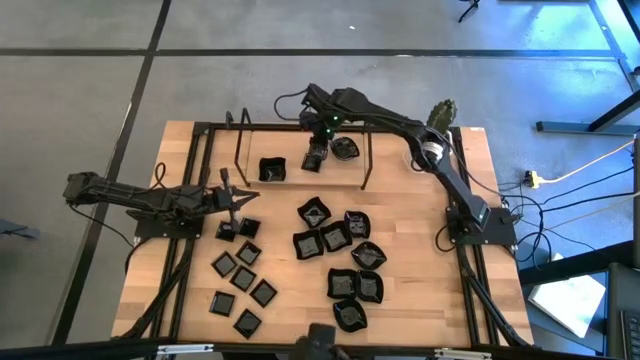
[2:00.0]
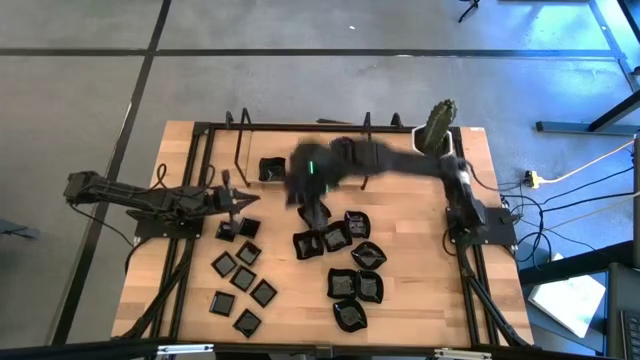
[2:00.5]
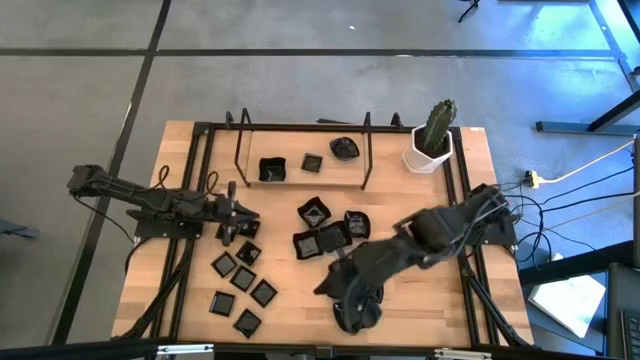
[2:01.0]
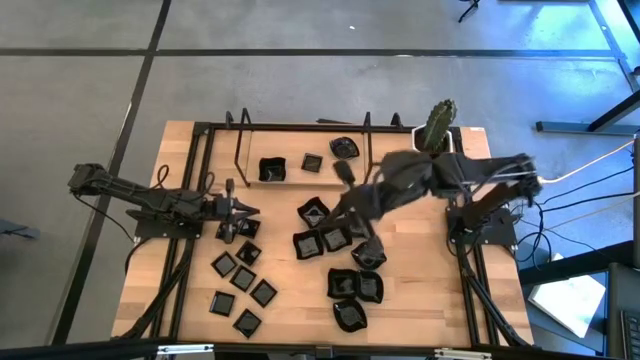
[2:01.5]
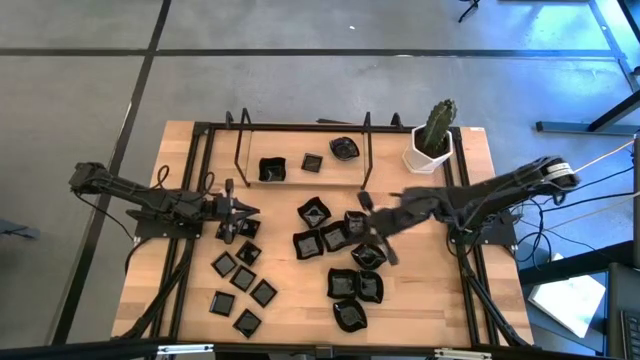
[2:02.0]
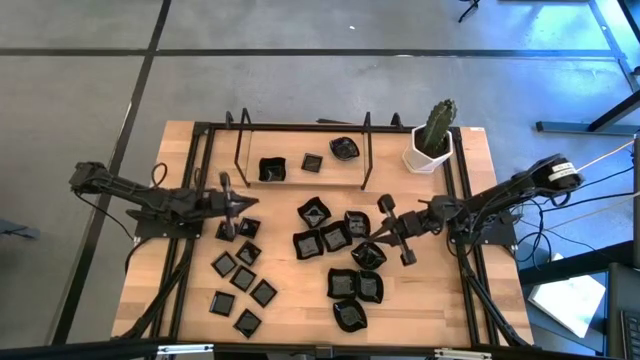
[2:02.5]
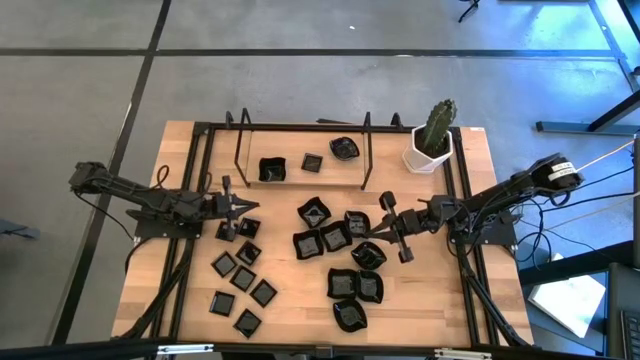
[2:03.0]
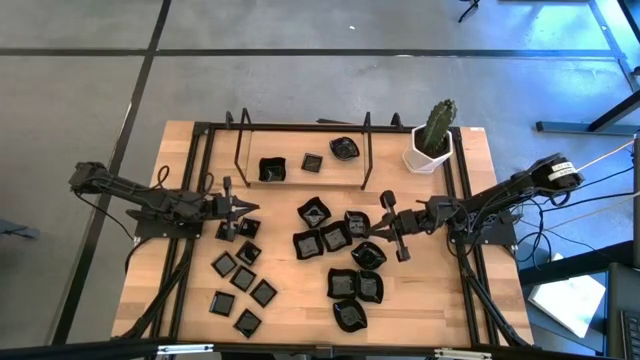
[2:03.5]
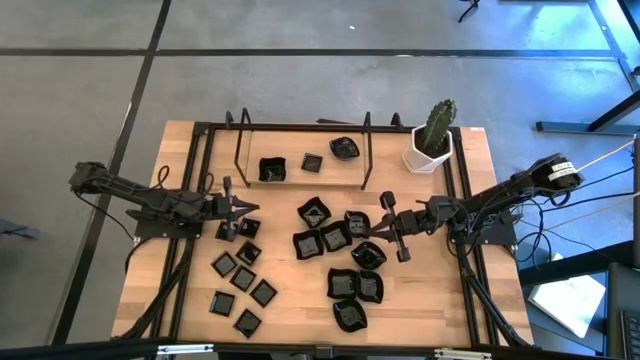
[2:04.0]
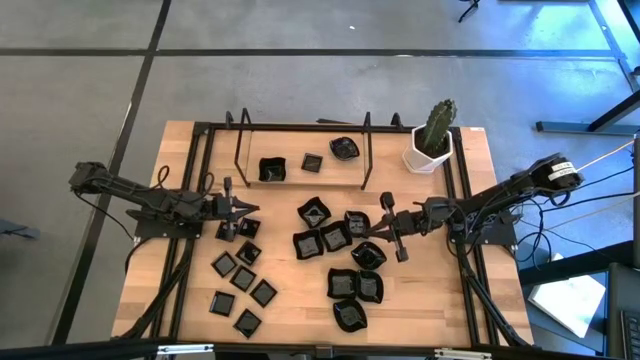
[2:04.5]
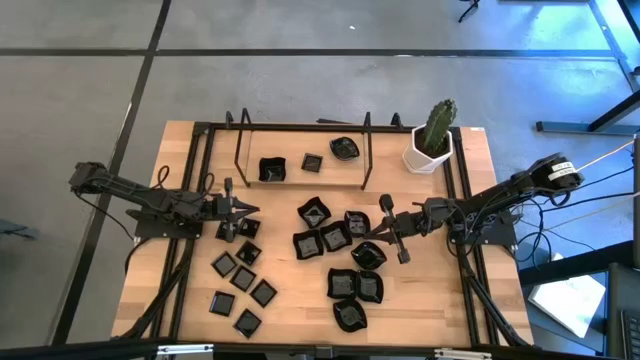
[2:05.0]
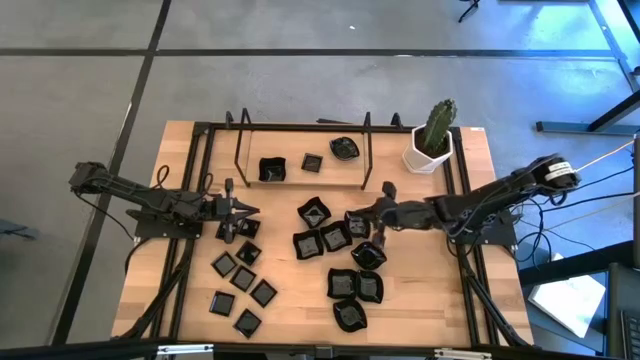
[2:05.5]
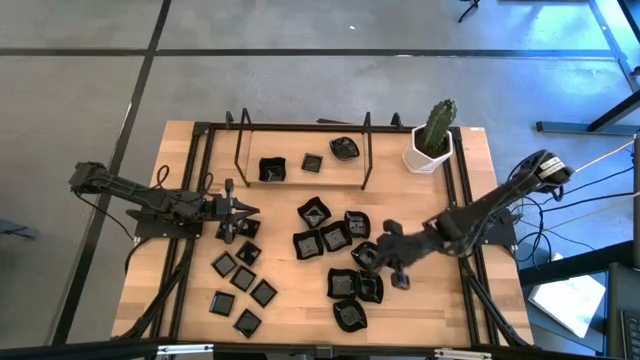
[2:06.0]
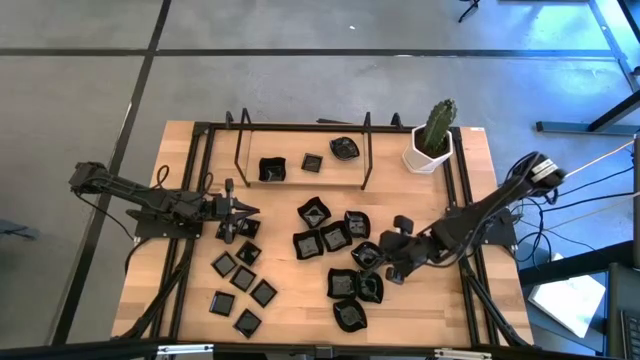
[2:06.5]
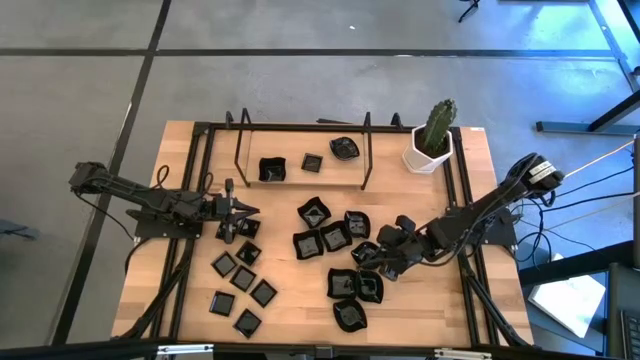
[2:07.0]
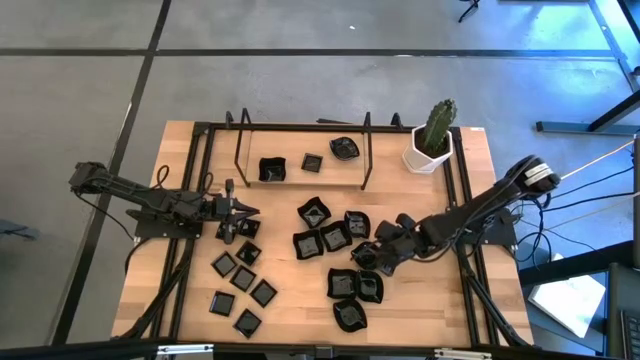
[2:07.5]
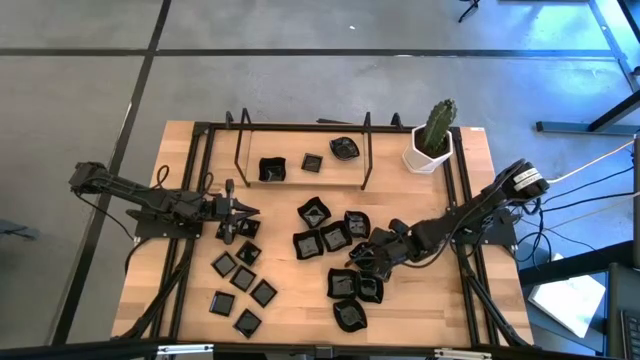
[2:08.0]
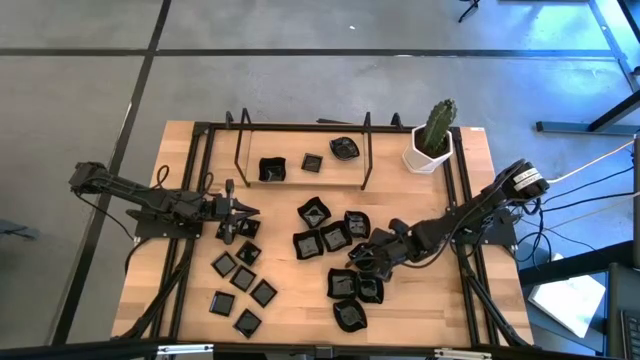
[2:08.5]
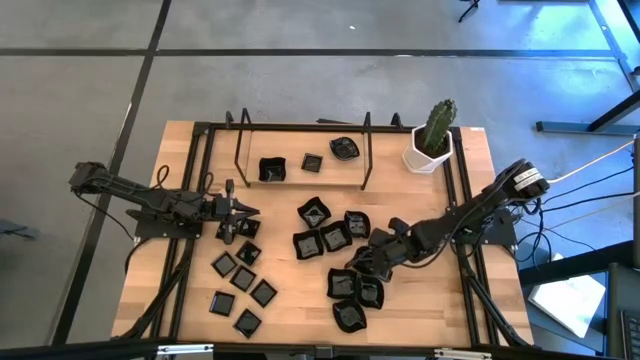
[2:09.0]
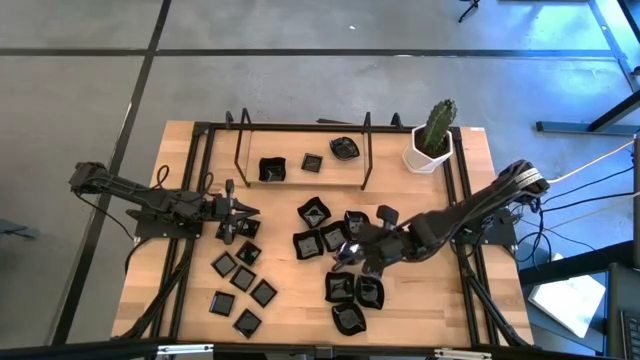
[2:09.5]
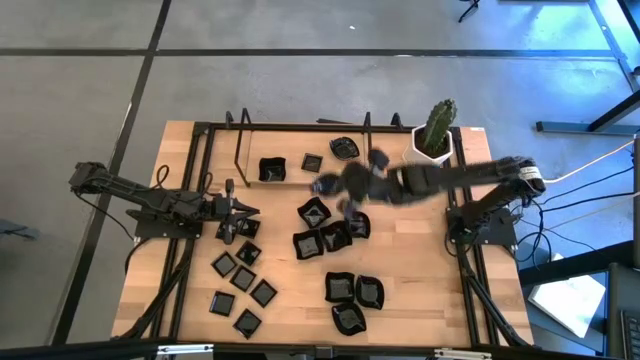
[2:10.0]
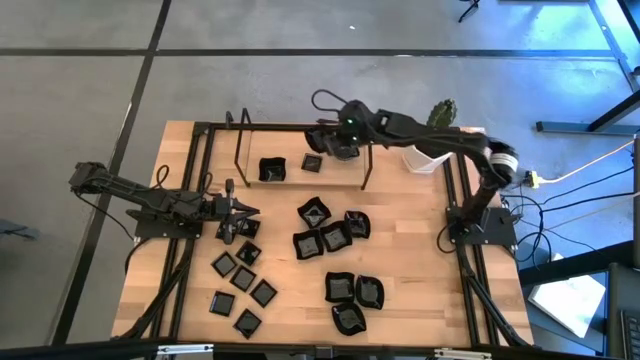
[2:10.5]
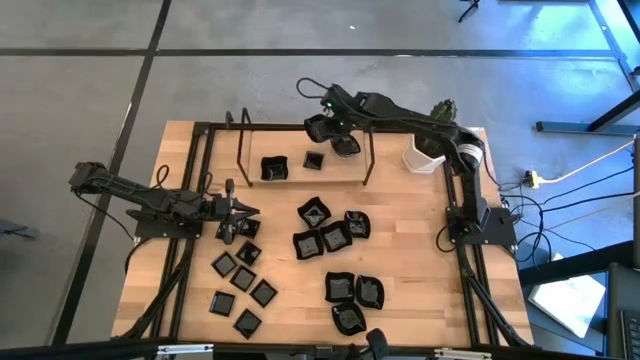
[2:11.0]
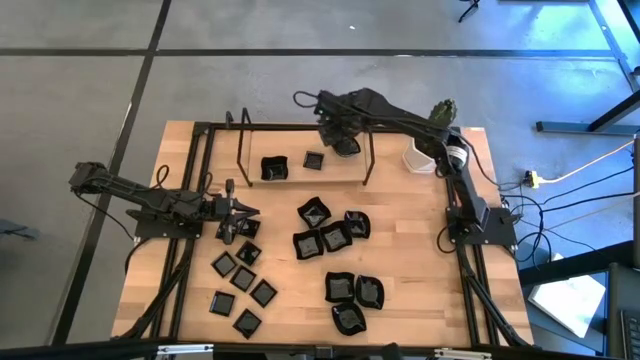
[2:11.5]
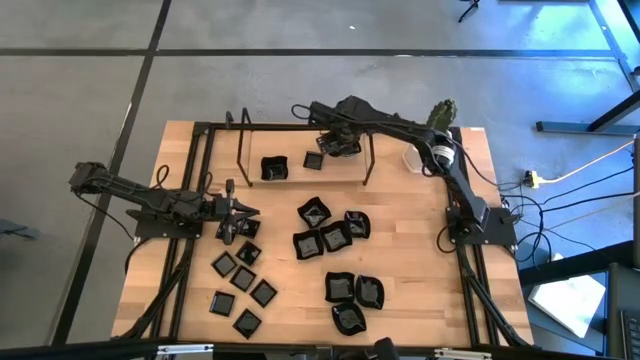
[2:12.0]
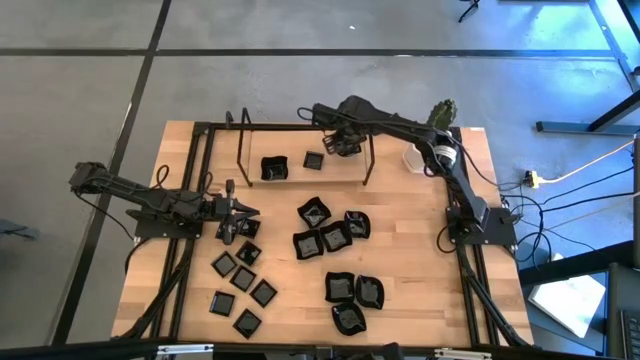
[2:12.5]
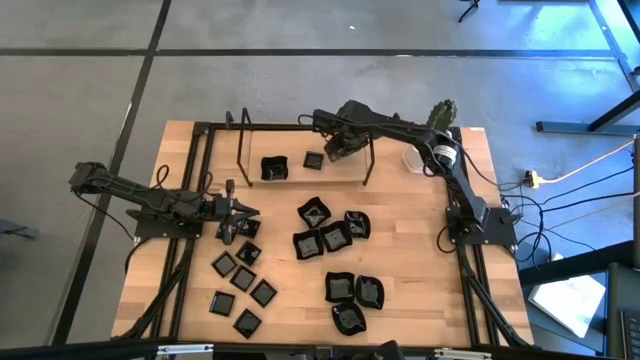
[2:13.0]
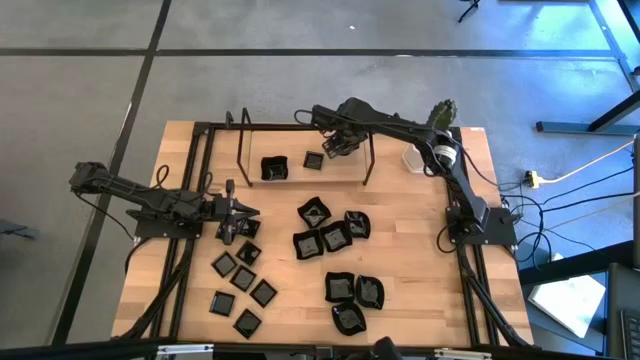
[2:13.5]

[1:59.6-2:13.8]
Task: Pick & Place Mini shaped plates
Stack the leaf-shaped plate on top of the leaf-shaped plate on the shelf

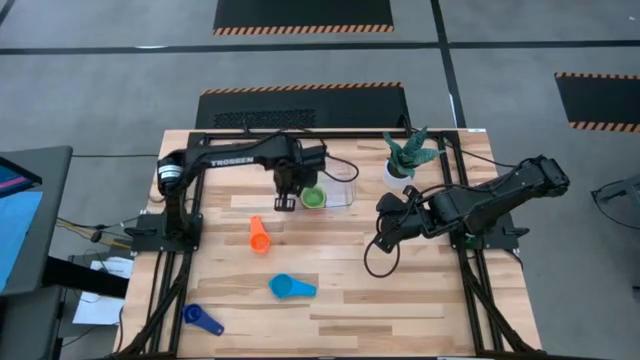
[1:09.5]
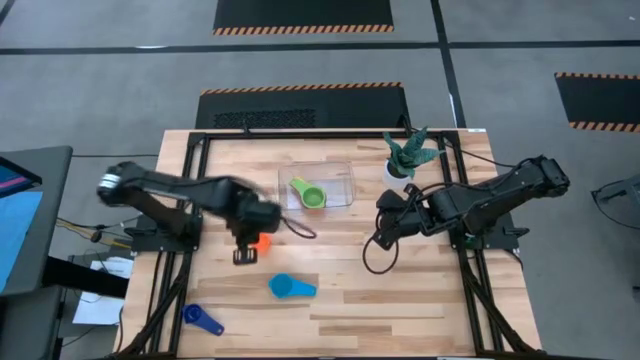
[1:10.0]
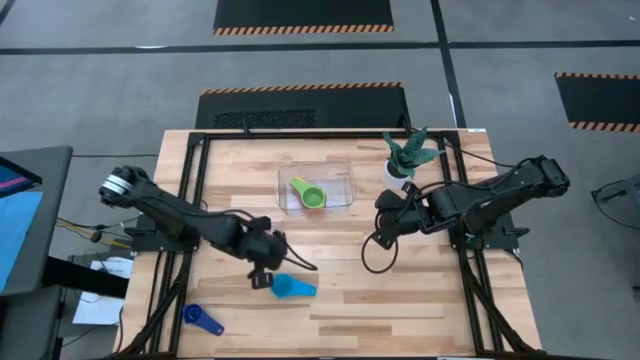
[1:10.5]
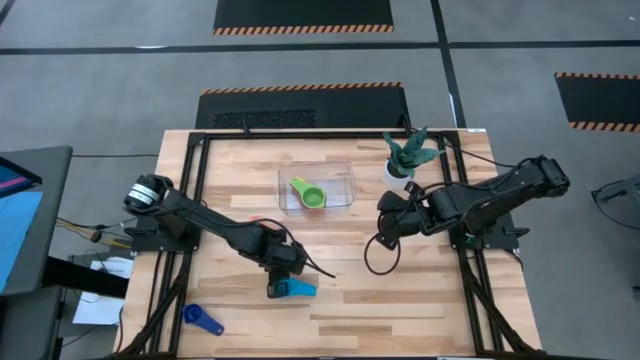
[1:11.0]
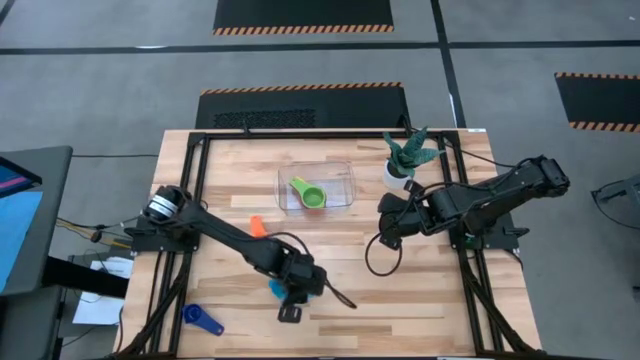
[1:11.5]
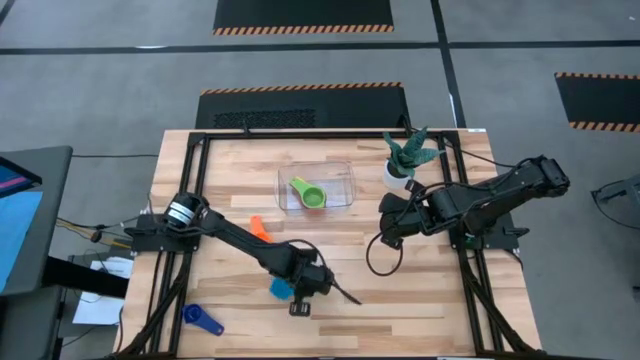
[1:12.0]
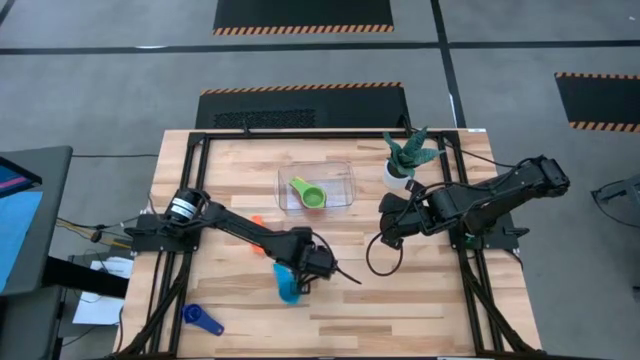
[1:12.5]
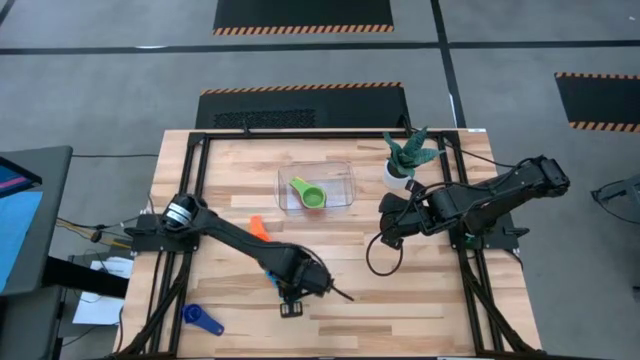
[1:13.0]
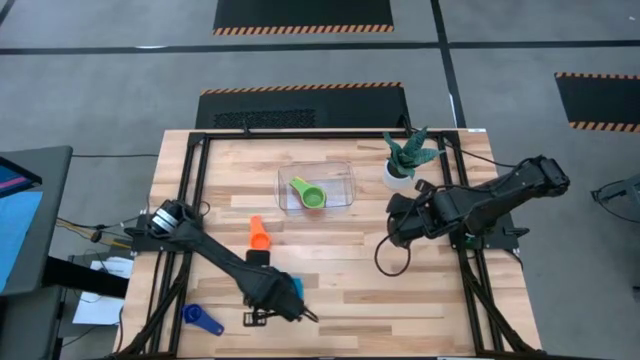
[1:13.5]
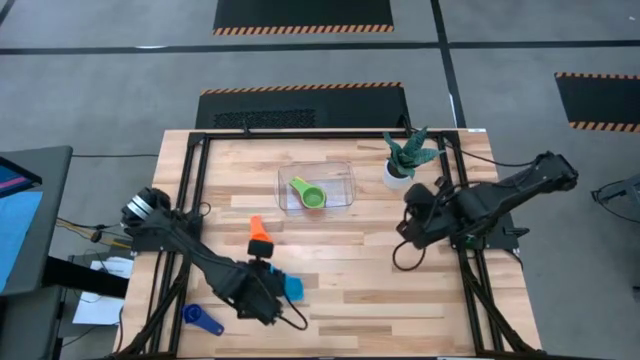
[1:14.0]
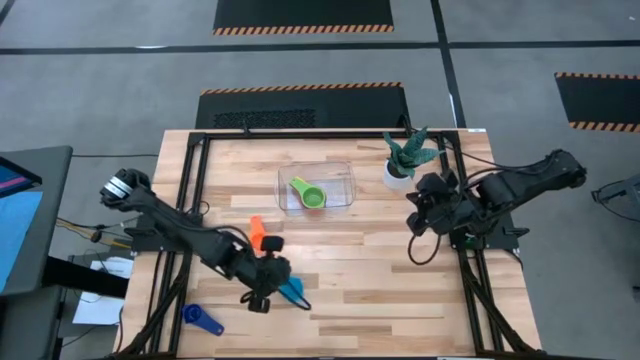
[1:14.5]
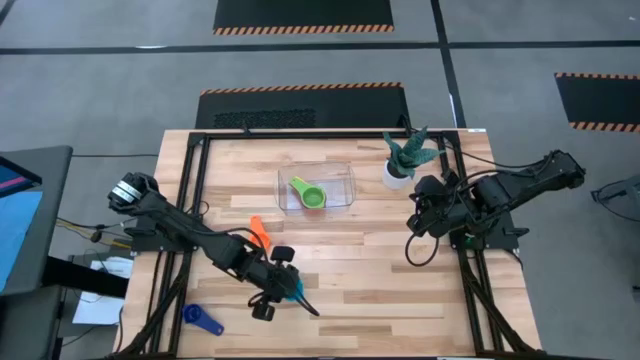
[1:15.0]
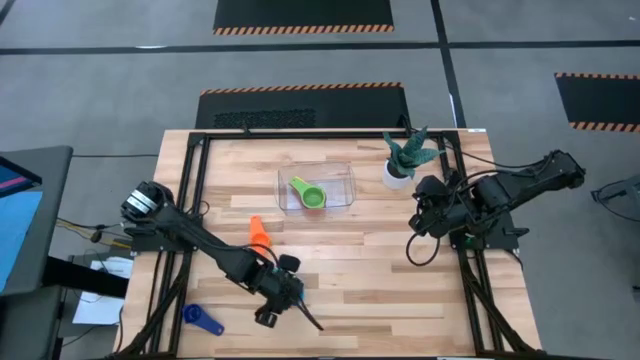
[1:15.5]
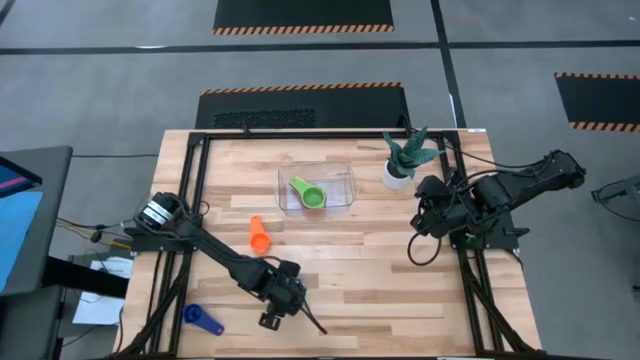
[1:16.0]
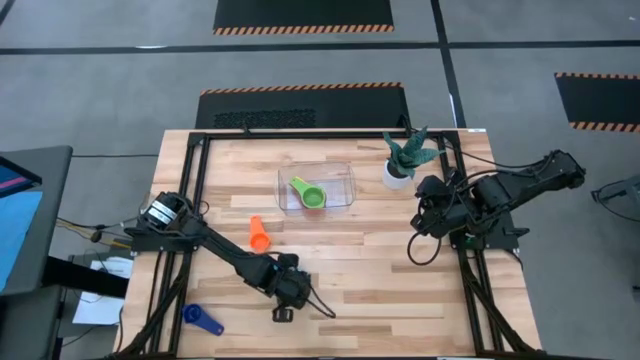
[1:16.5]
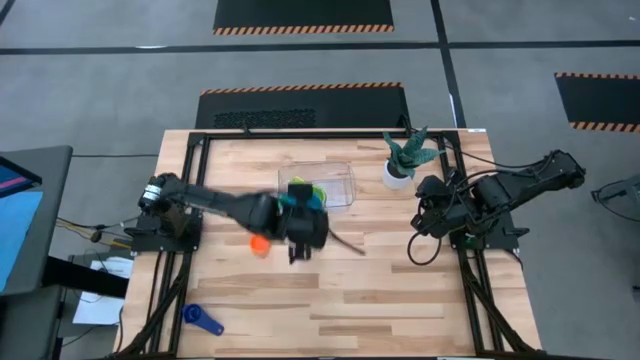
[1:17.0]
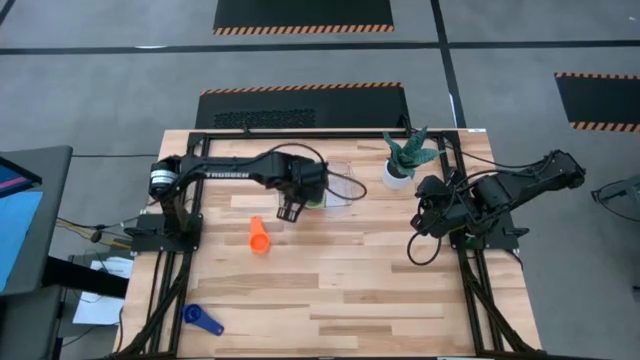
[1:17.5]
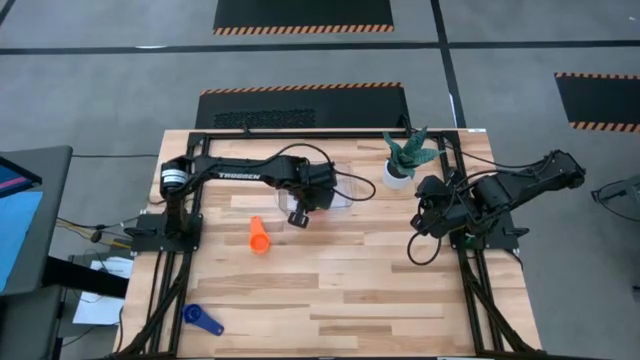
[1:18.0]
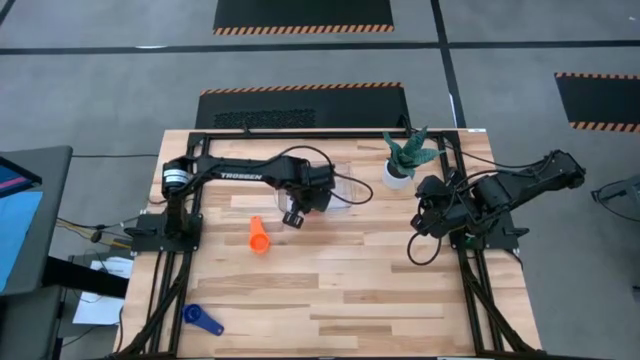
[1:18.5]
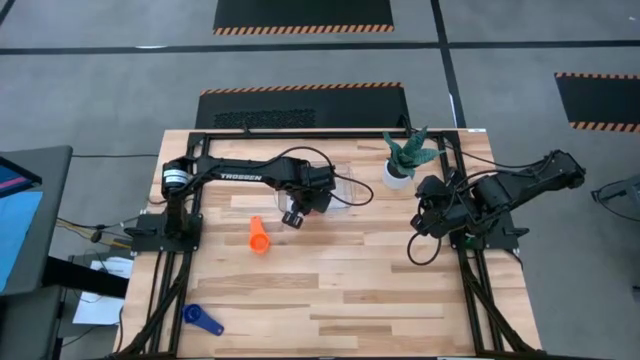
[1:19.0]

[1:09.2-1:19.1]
Task: Nest measuring cups in basket
Stack the light blue measuring on top of the green measuring cup in the transparent bin
